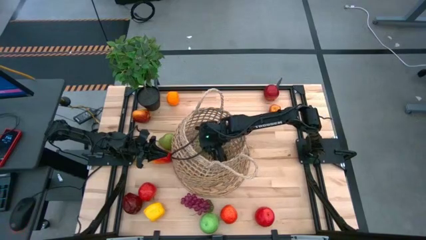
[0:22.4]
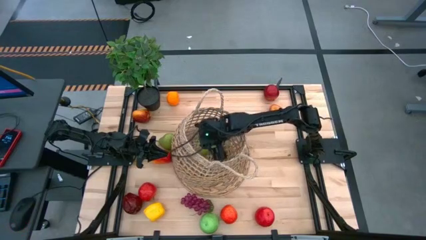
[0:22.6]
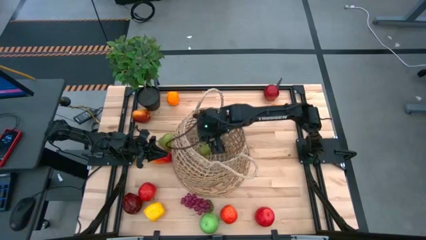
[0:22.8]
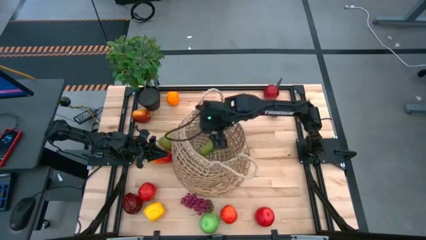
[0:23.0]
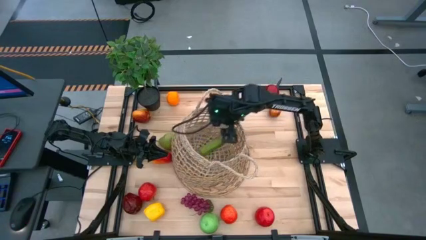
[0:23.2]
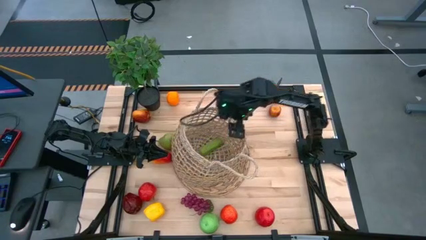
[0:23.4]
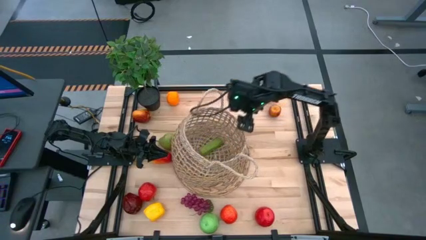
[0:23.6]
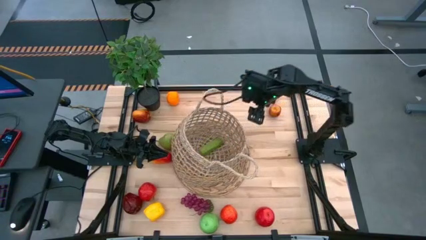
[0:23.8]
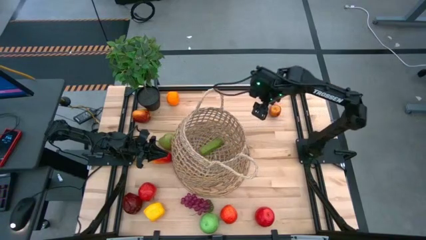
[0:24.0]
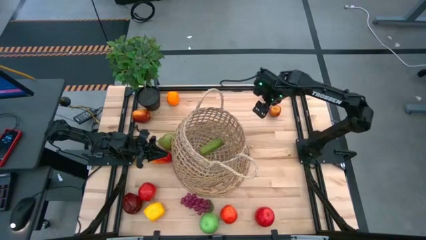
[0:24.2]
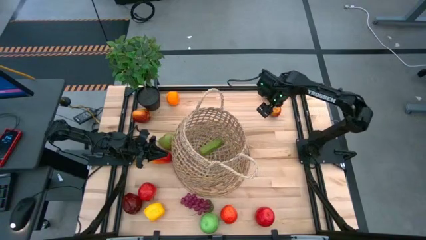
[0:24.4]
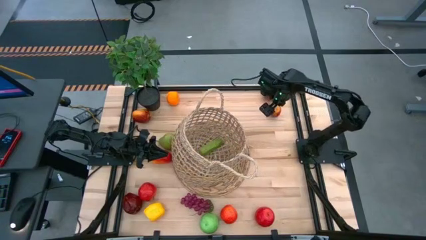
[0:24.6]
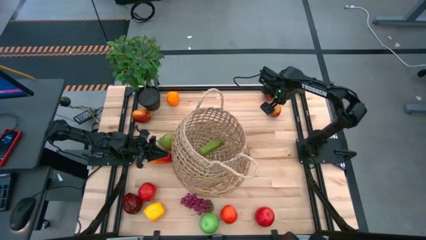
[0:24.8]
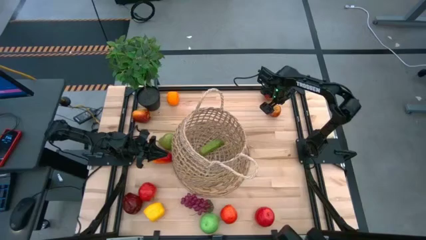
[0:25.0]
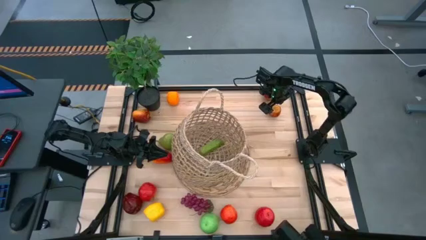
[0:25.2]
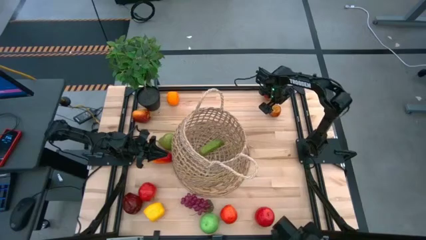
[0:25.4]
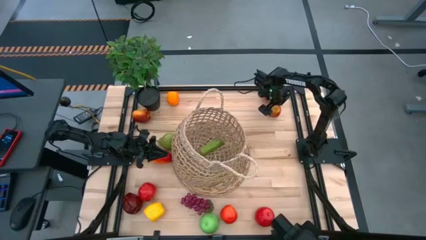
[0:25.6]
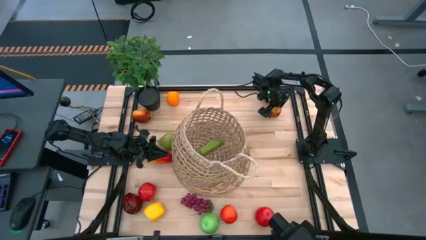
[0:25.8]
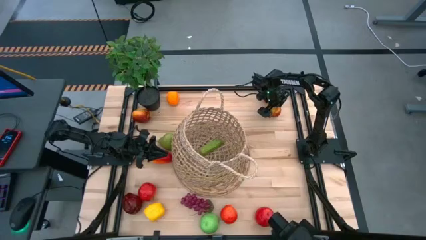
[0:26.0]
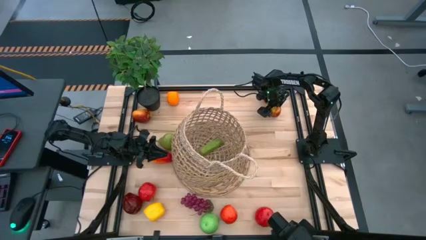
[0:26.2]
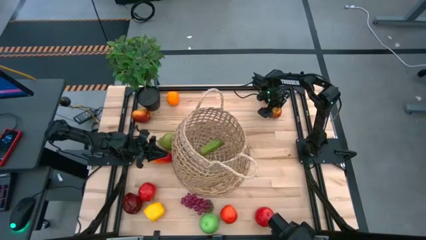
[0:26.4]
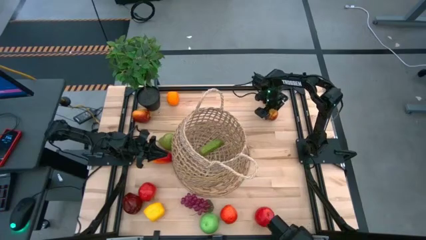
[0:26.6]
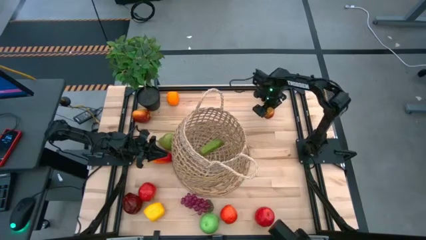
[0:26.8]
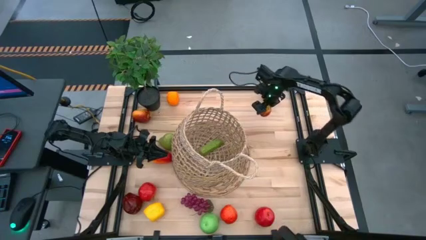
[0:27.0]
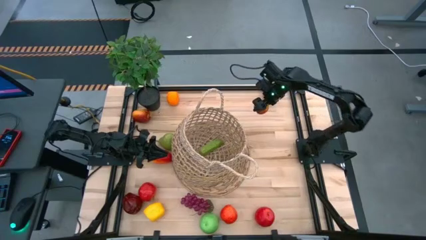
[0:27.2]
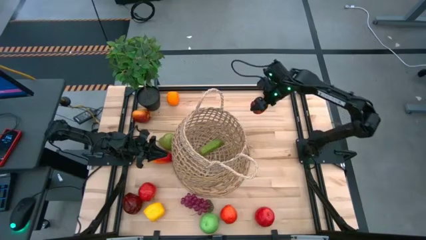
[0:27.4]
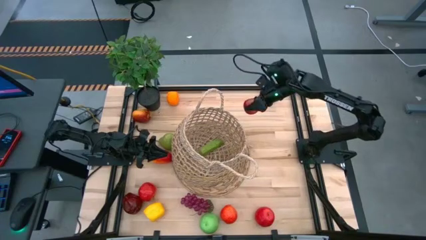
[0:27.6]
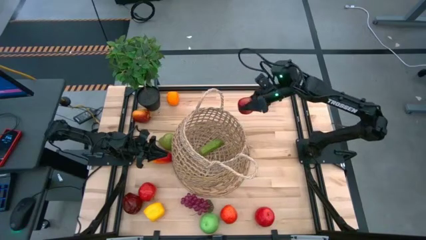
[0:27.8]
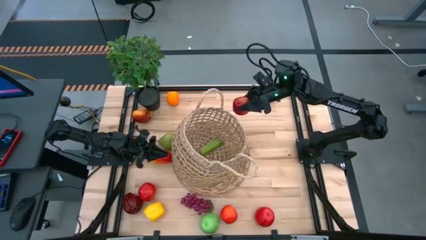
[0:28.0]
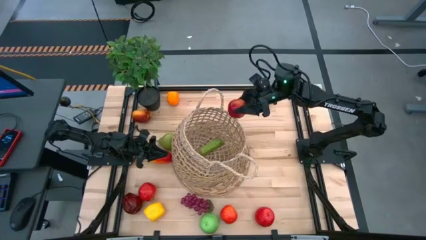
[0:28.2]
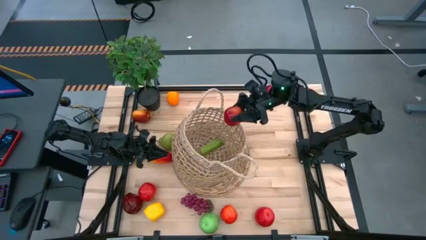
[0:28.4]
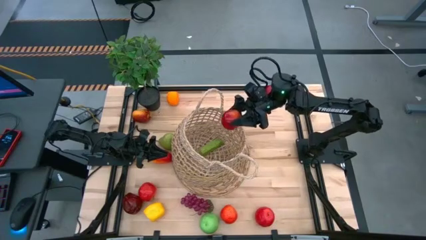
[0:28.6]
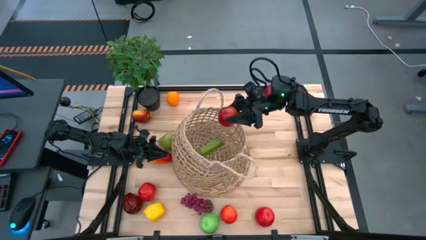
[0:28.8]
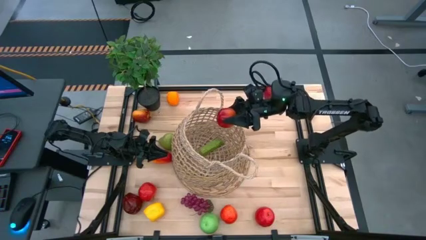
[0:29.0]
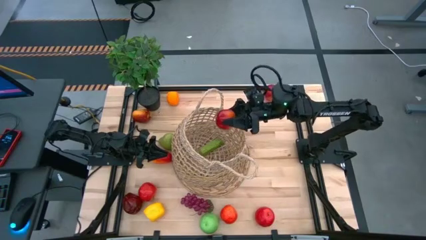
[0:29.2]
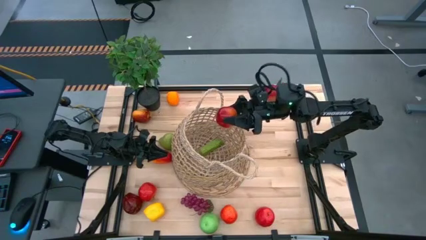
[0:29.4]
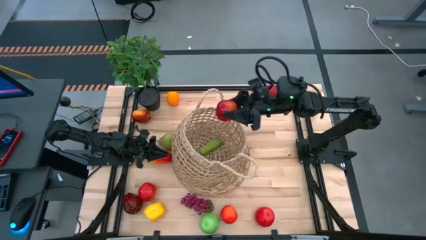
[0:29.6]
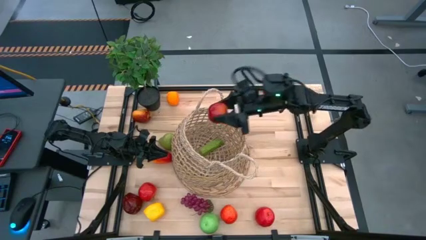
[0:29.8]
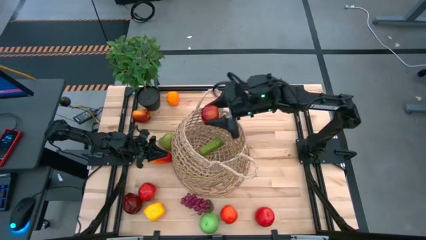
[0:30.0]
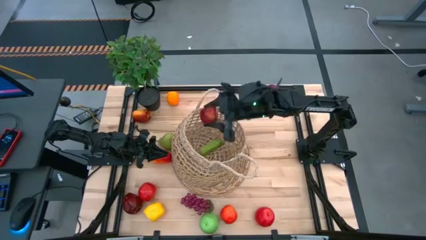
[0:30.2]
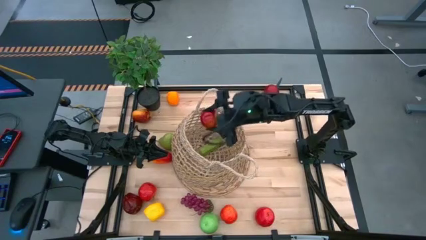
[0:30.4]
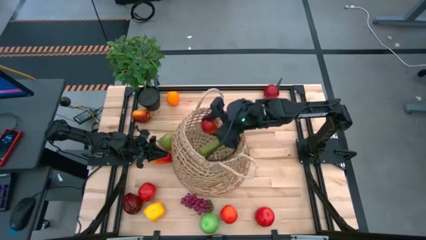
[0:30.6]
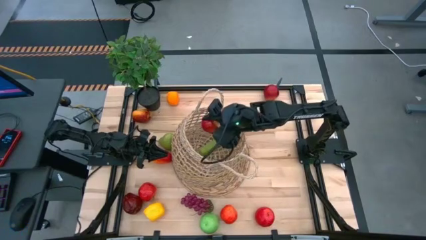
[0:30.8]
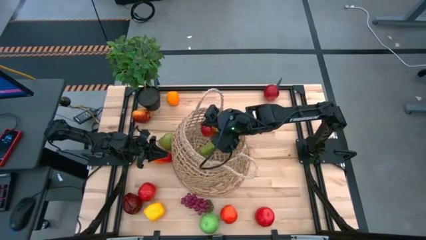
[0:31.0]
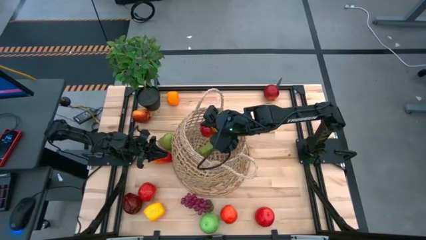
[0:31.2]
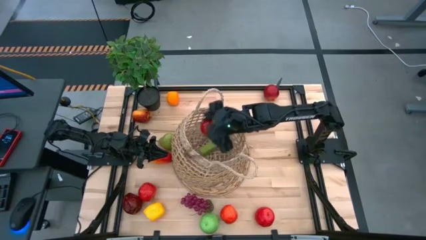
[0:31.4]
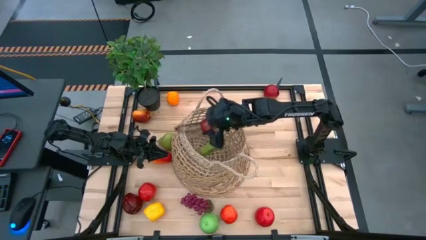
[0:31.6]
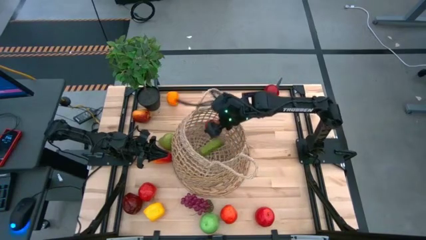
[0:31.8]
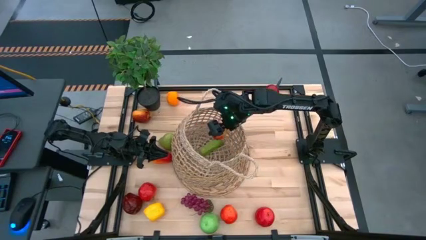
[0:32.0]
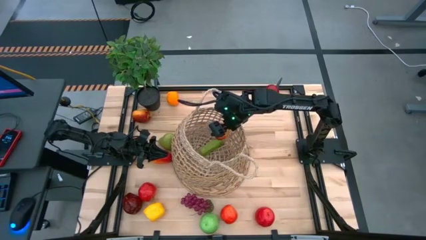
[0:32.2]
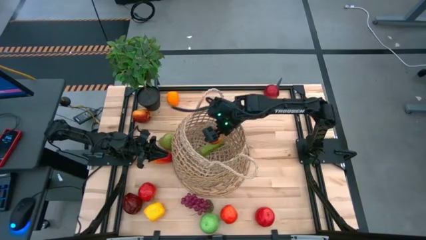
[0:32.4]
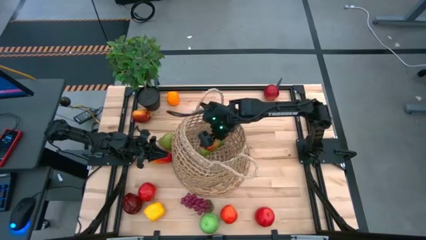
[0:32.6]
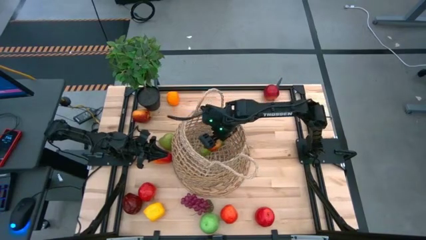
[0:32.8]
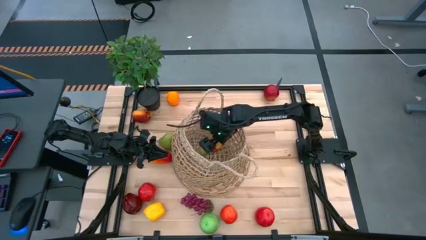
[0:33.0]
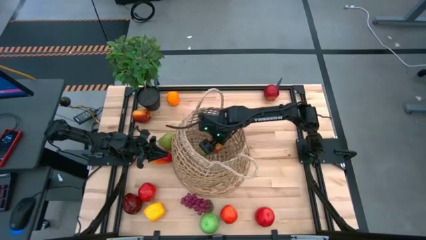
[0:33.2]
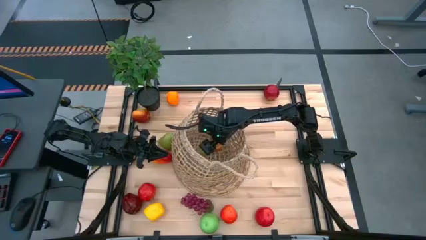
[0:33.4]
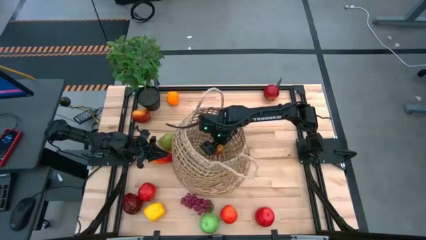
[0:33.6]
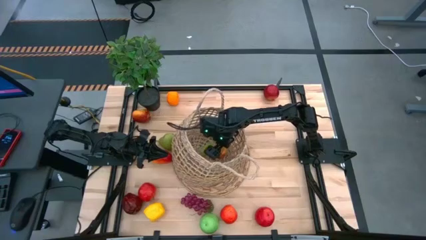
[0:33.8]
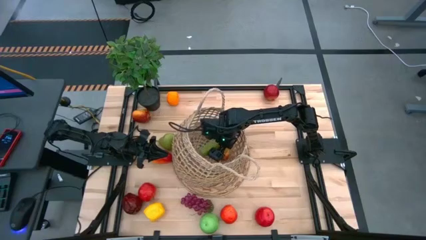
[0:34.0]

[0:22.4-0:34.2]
Task: Build produce basket
Put the apple into the basket
